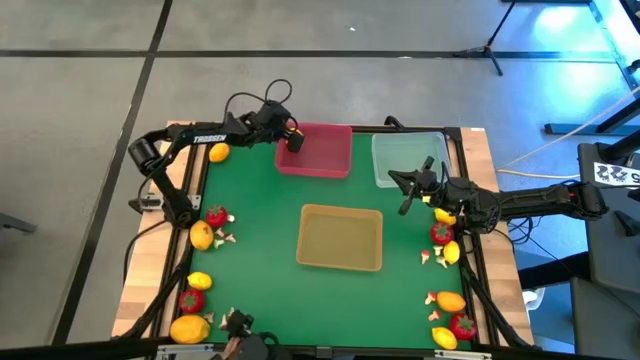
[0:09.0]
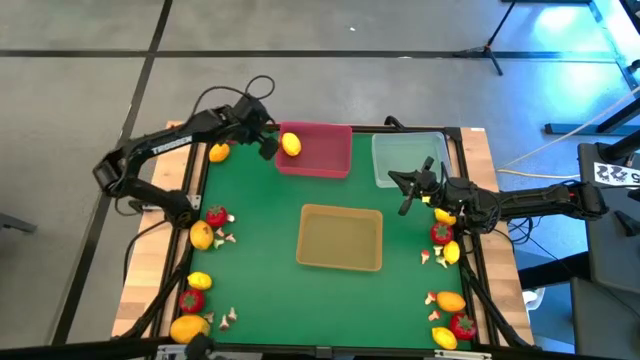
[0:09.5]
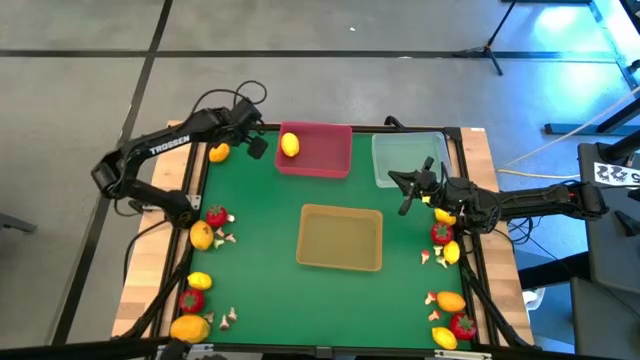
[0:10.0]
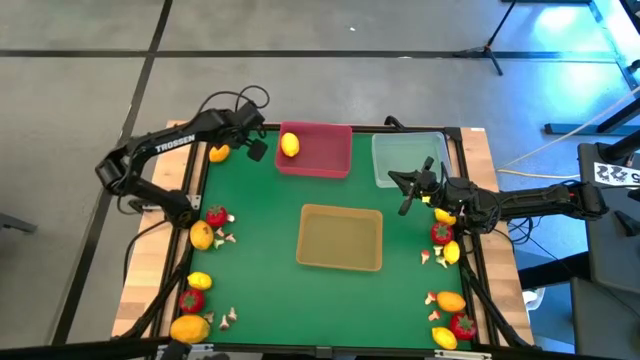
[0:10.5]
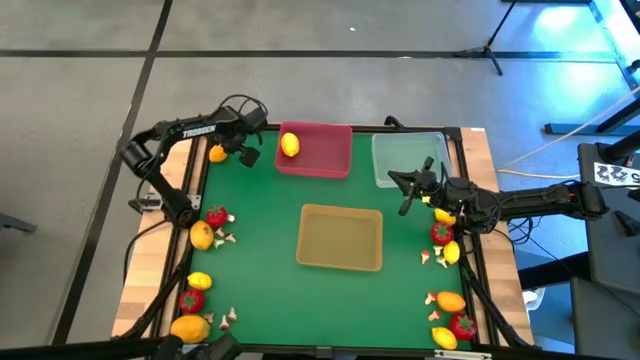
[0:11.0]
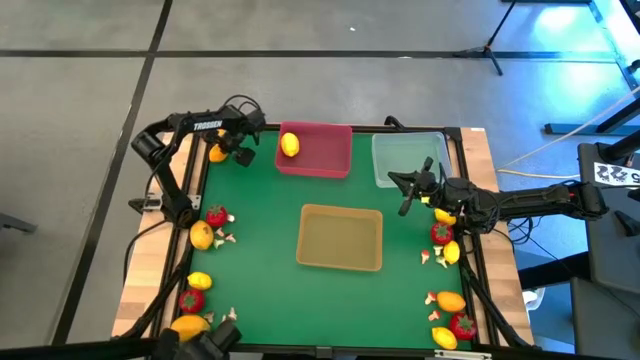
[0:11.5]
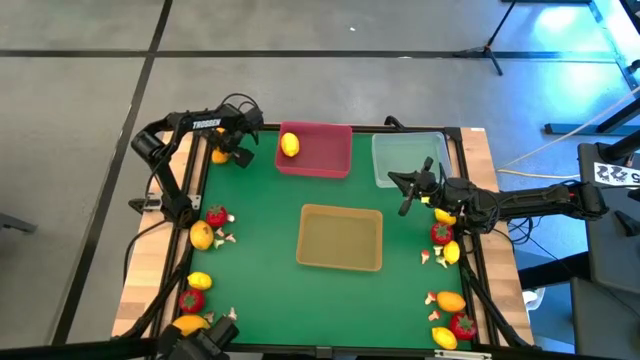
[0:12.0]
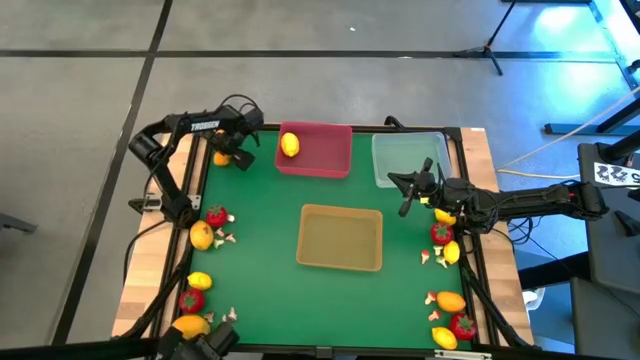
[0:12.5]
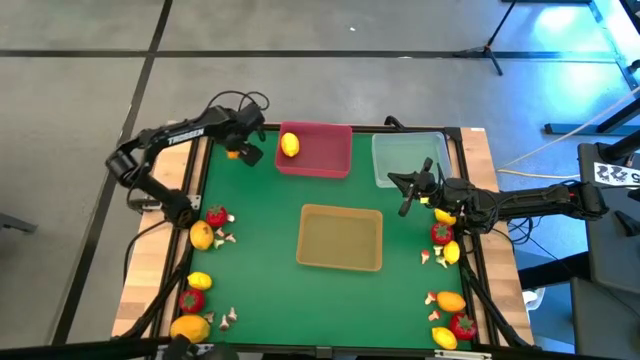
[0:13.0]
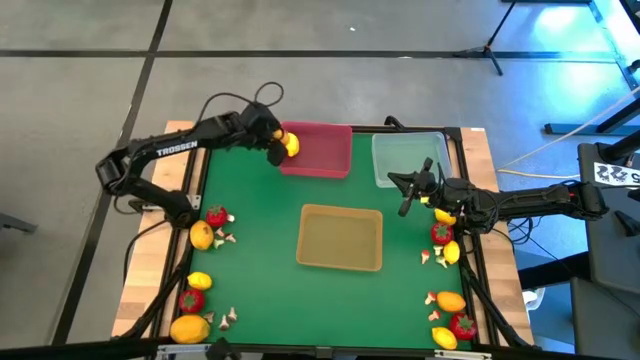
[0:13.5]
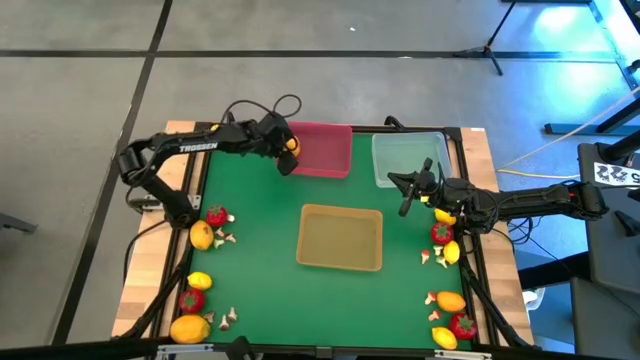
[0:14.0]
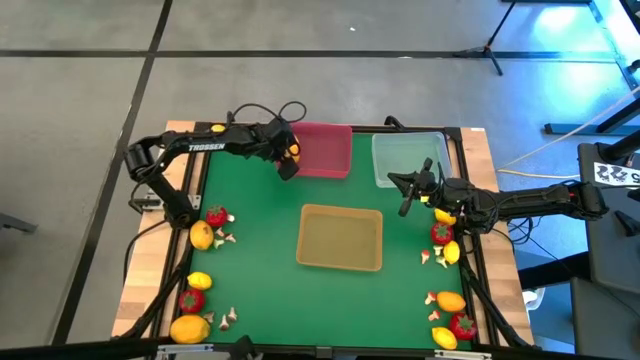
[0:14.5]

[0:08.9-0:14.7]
Task: Sort produce into baskets
Put the yellow lemon into the red bin

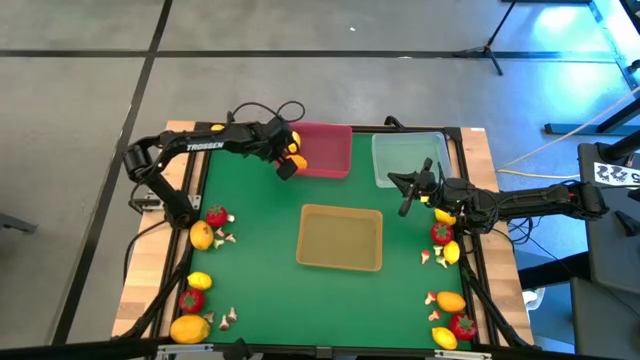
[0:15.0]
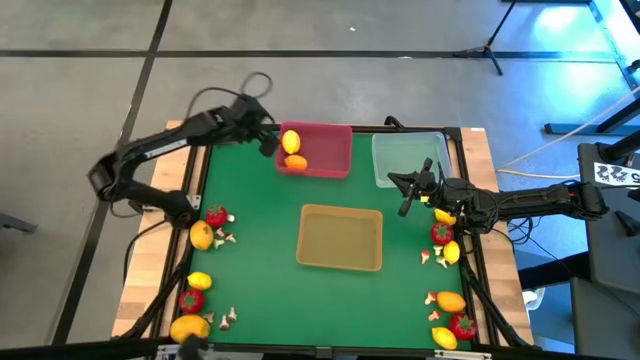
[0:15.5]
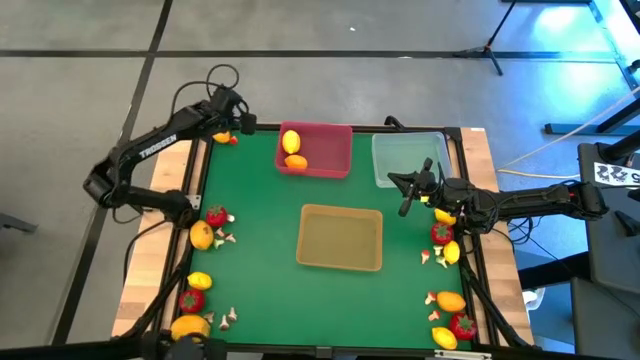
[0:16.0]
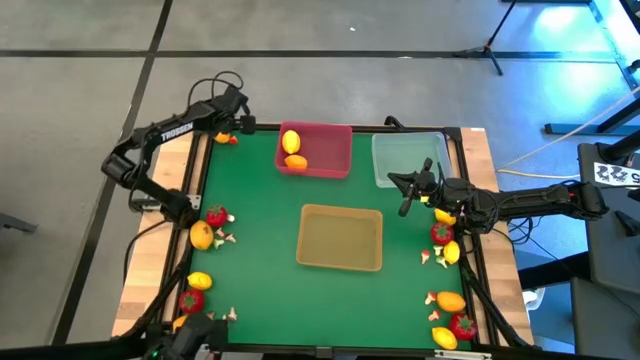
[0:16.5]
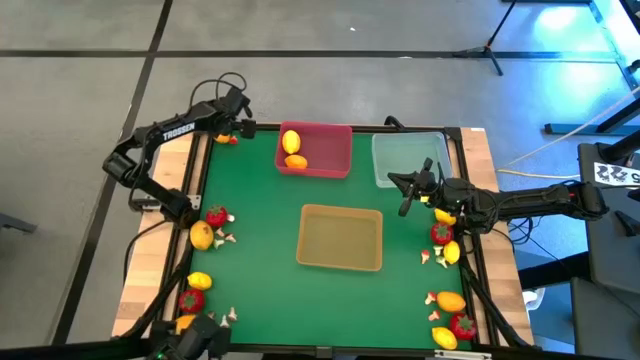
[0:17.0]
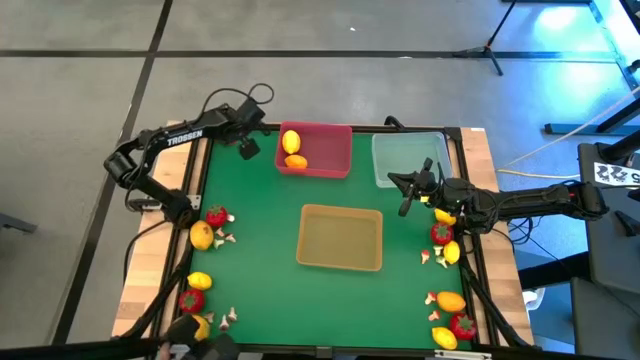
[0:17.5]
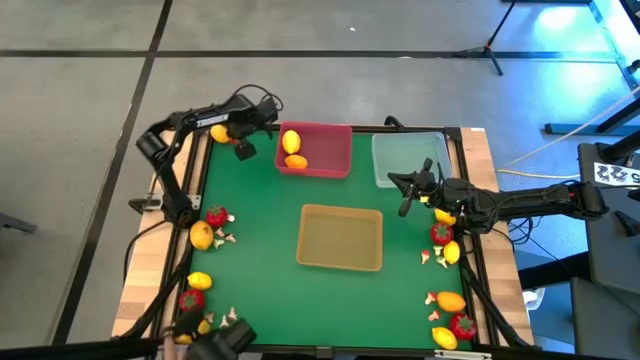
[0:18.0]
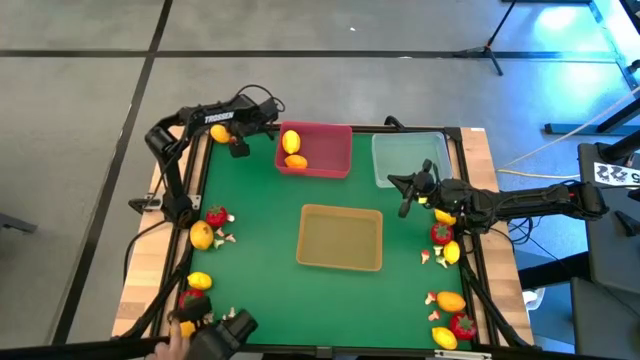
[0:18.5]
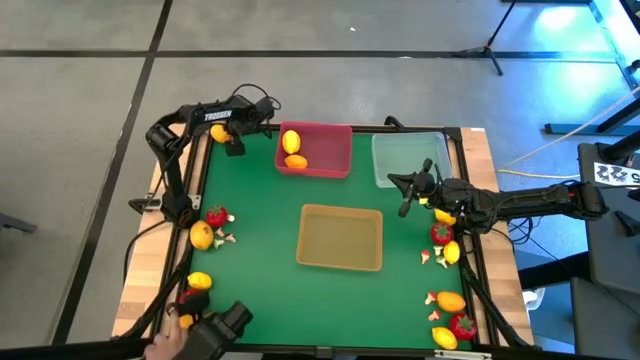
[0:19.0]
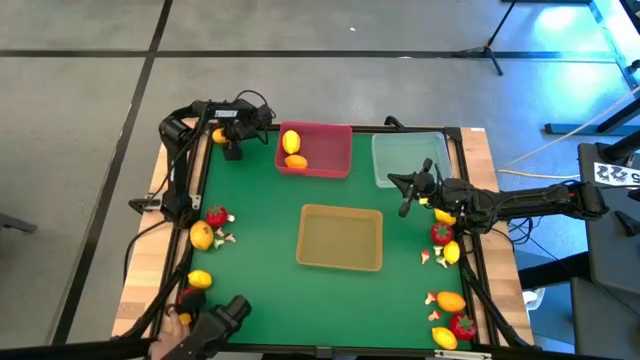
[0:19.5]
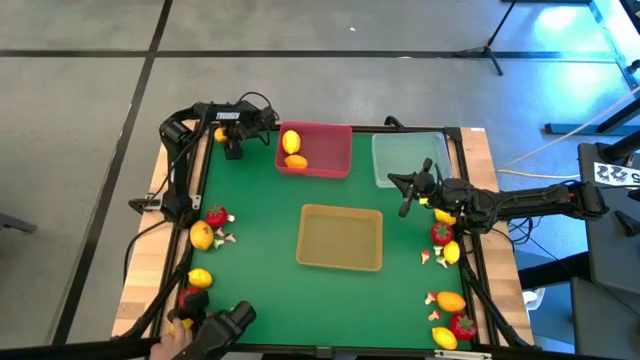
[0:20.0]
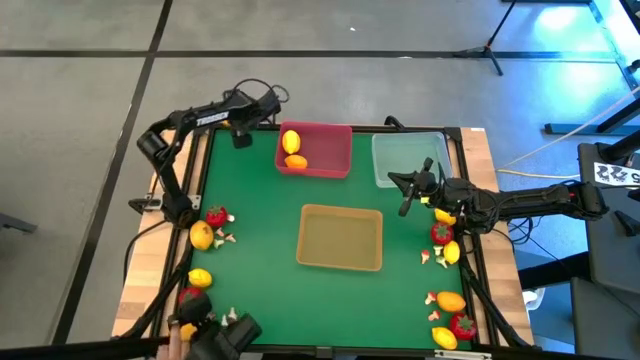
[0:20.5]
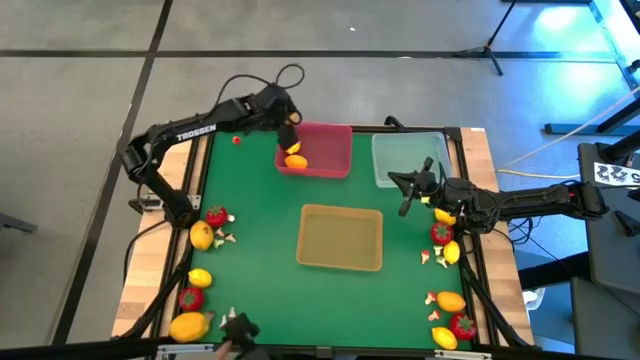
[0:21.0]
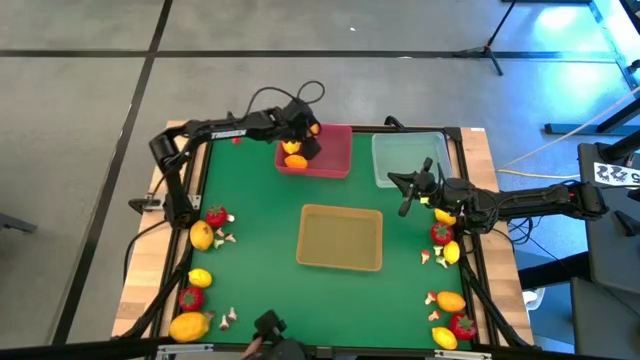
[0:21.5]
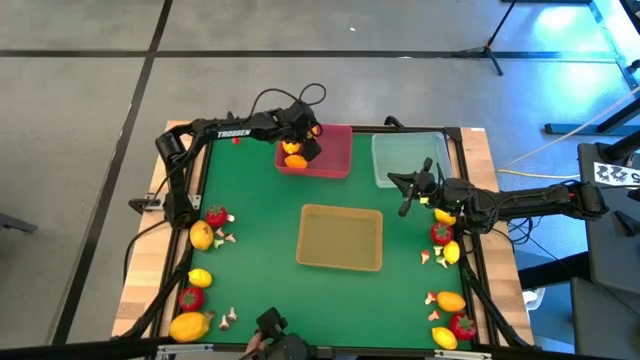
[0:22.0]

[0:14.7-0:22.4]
Put the yellow lemon into the red bin

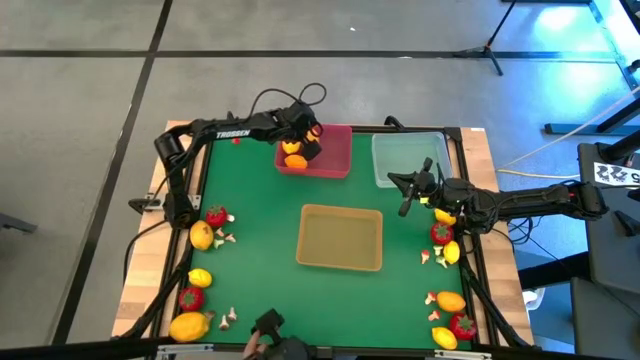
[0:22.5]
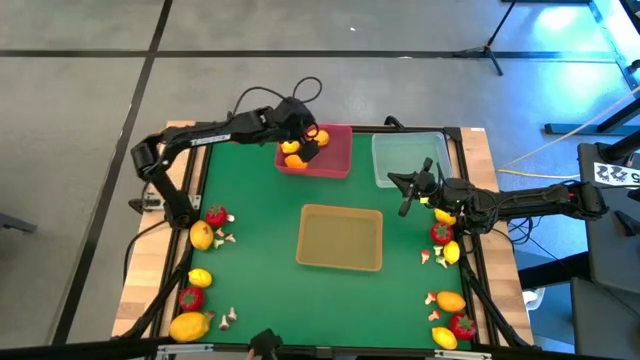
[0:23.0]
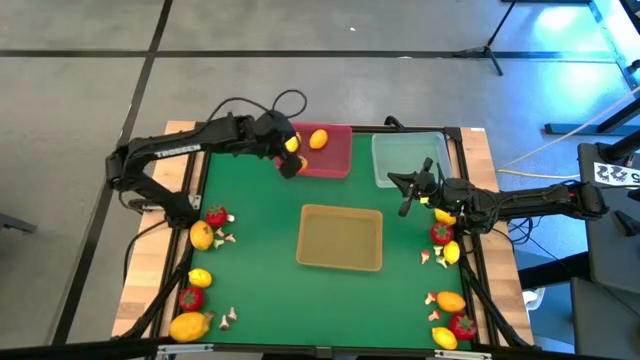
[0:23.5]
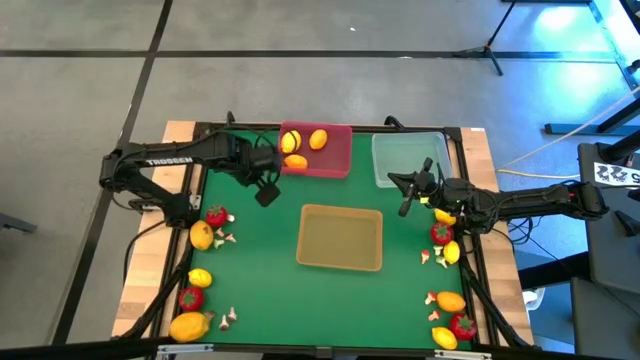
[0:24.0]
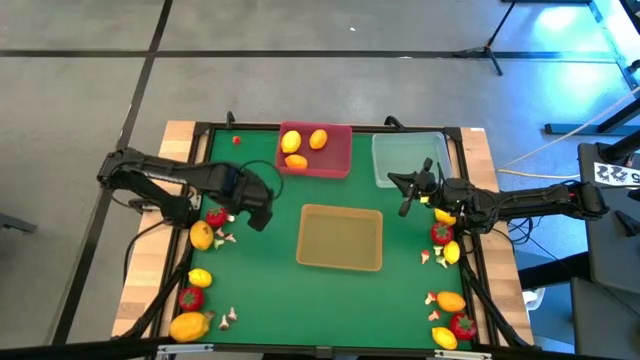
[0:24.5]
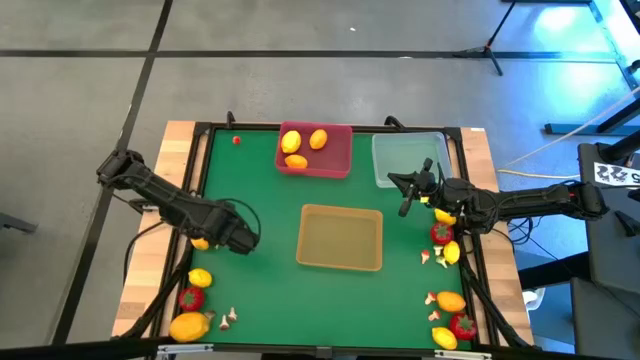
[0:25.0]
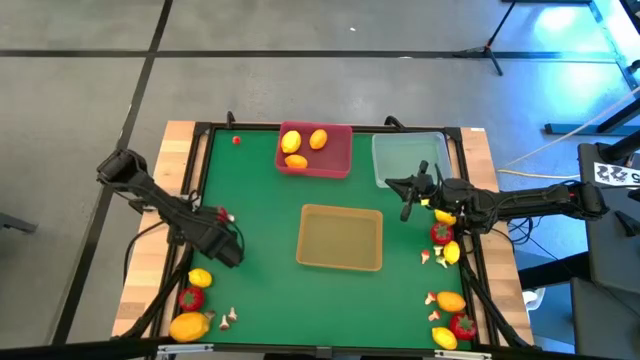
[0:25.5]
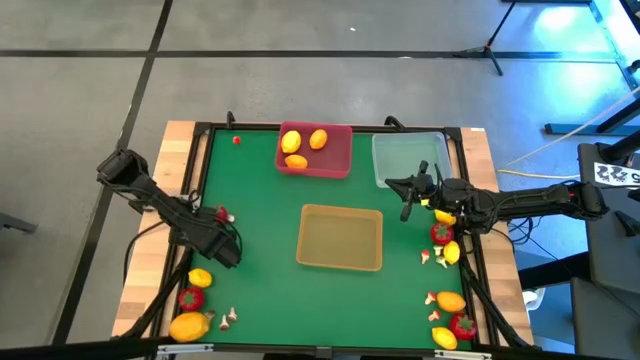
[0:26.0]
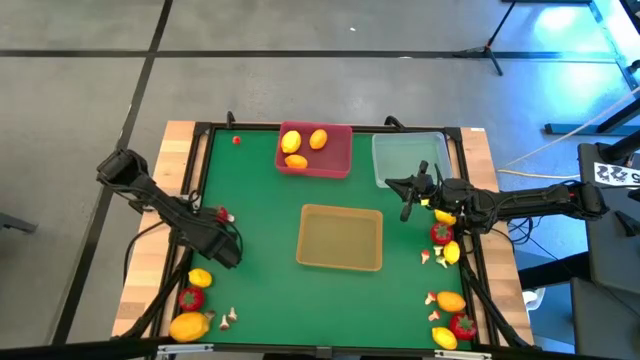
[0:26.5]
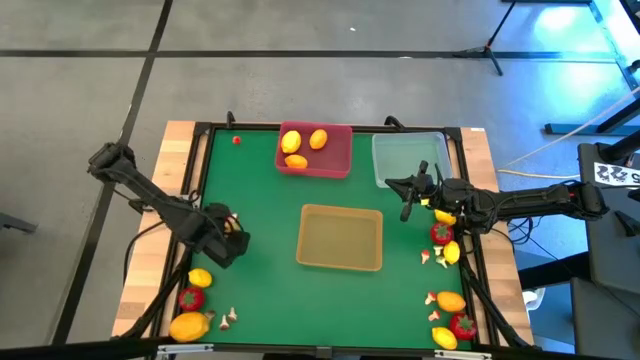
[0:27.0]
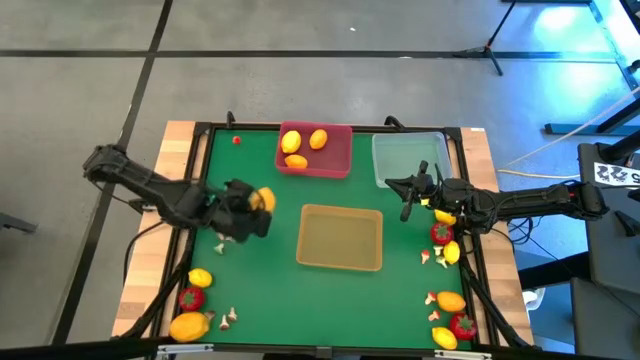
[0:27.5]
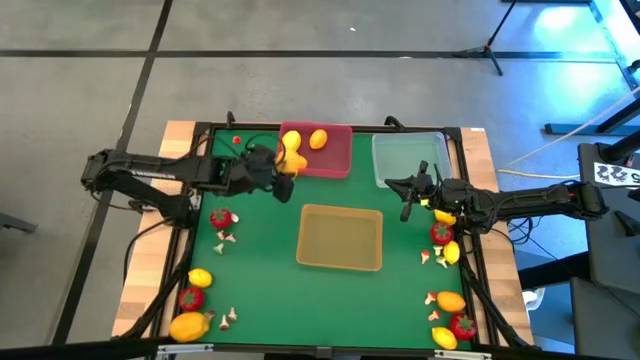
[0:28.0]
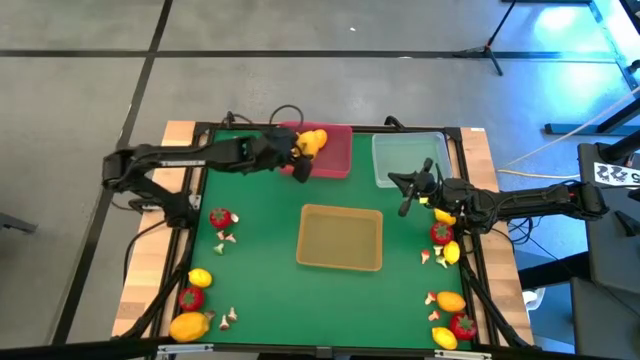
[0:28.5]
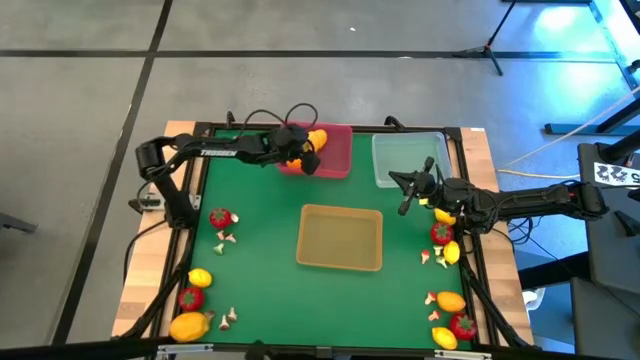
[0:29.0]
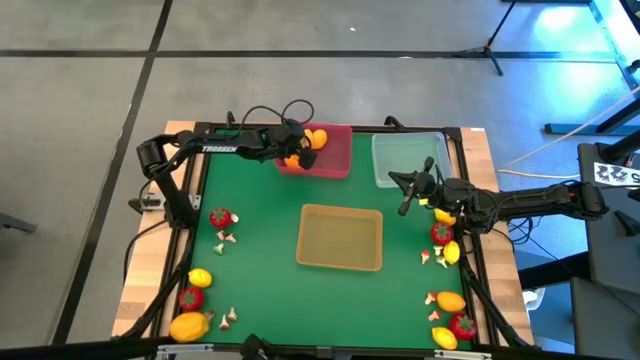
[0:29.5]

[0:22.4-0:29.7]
Put the yellow lemon into the red bin
